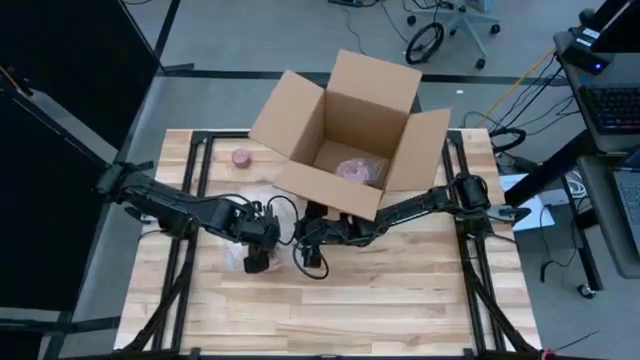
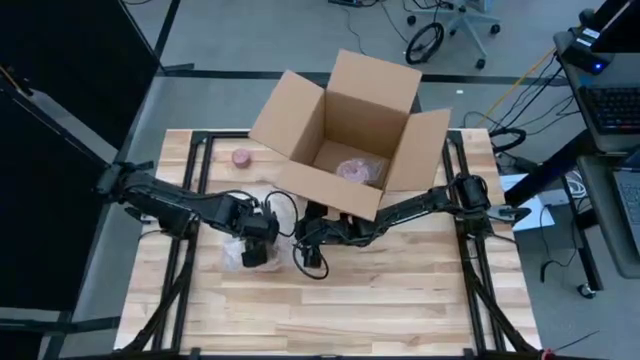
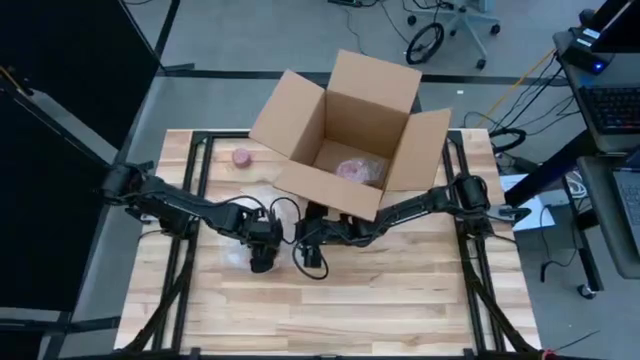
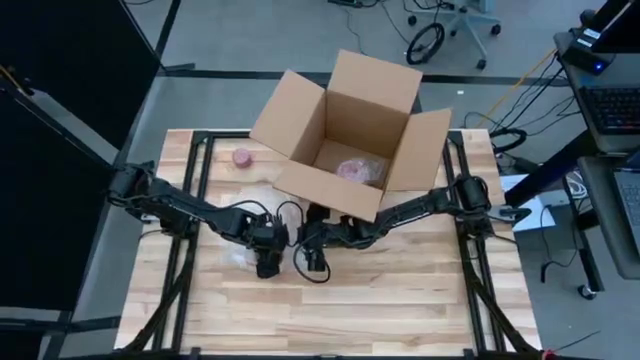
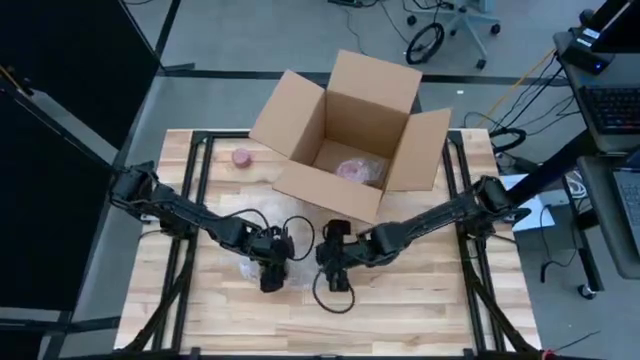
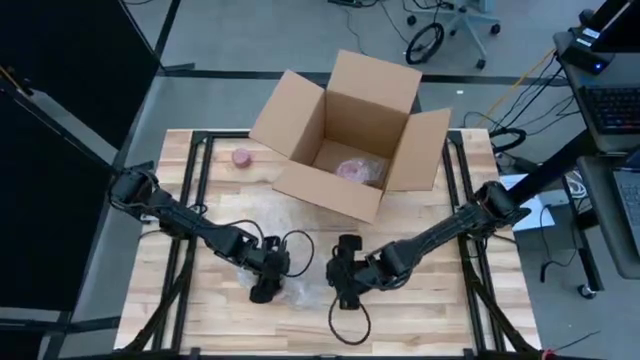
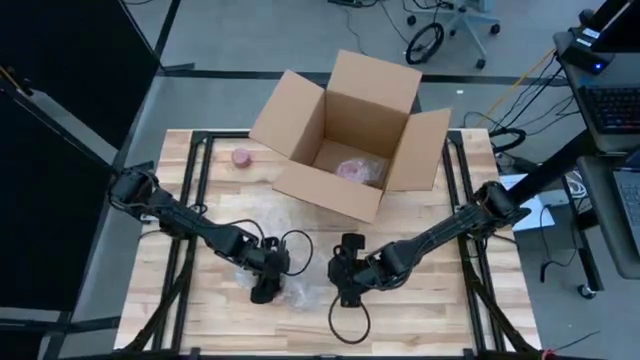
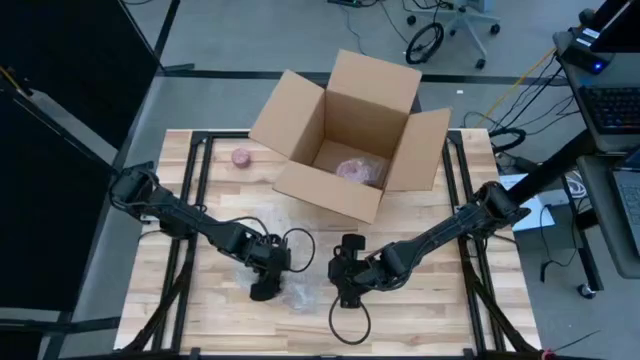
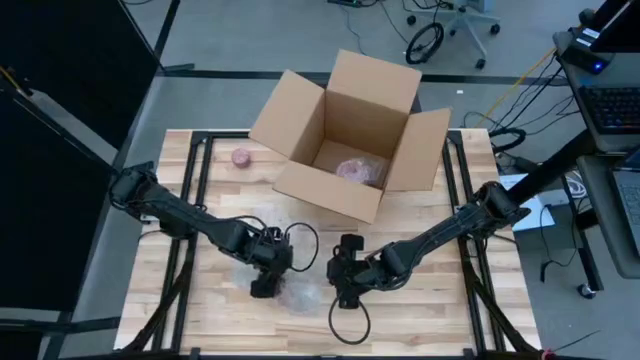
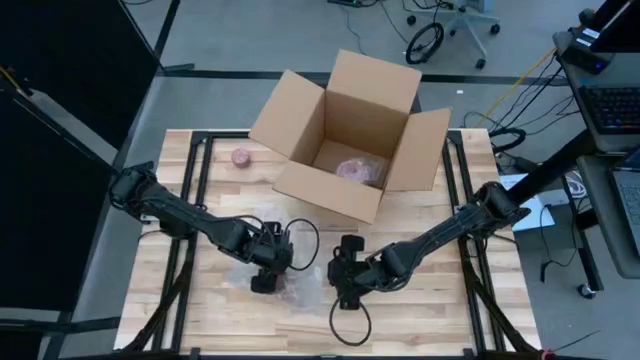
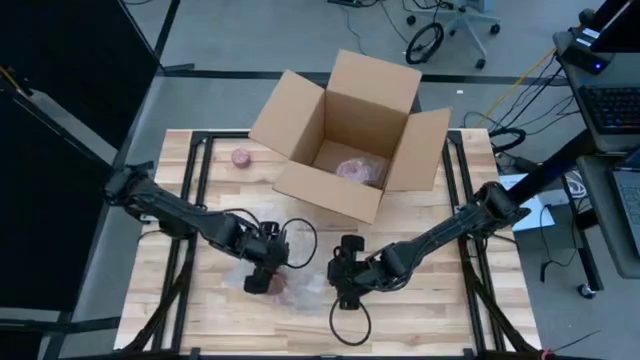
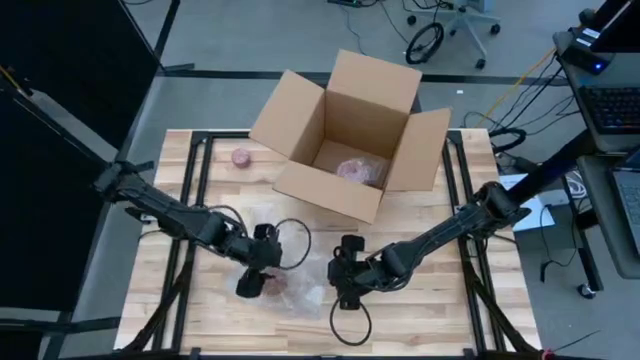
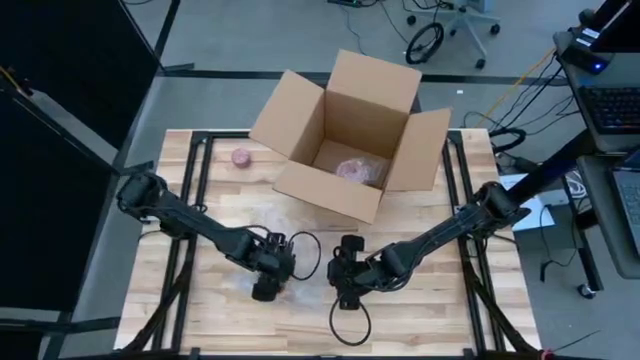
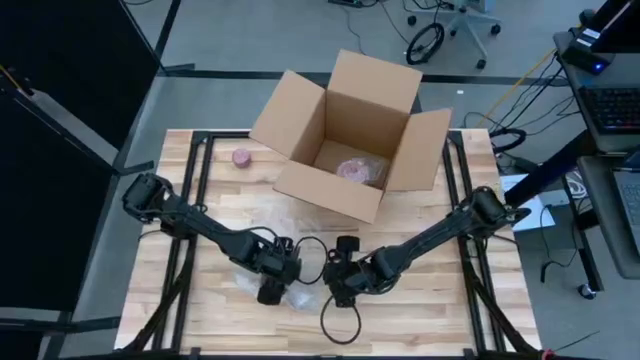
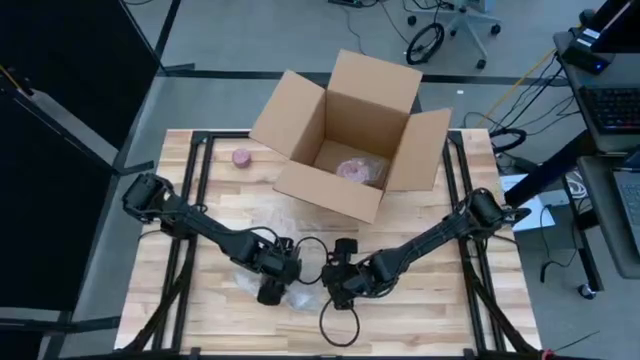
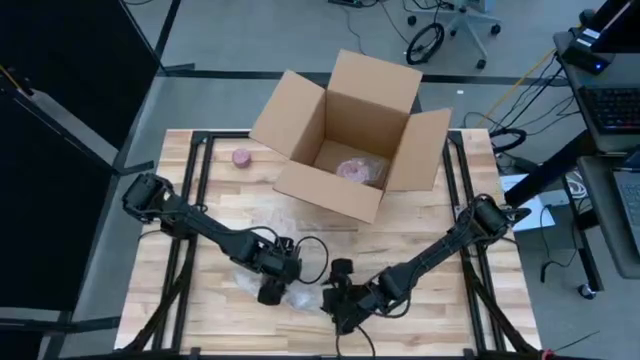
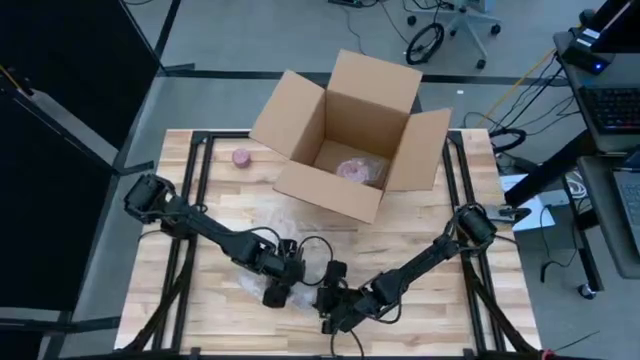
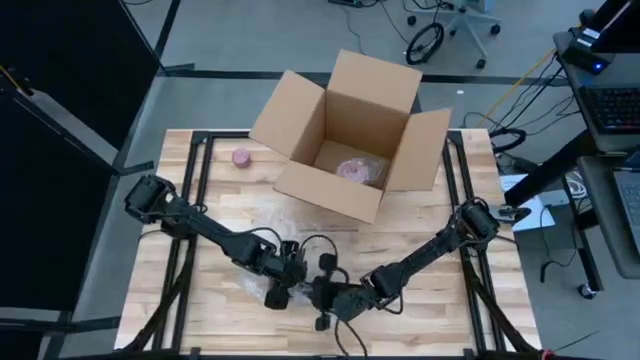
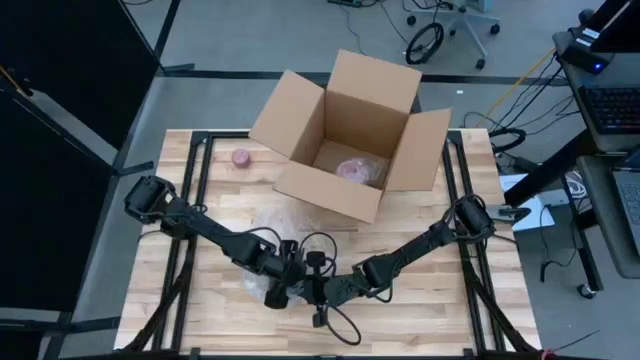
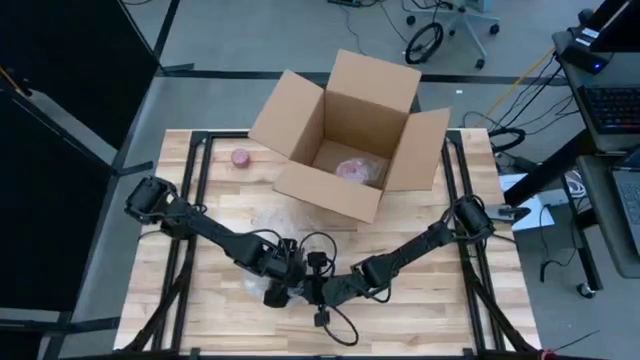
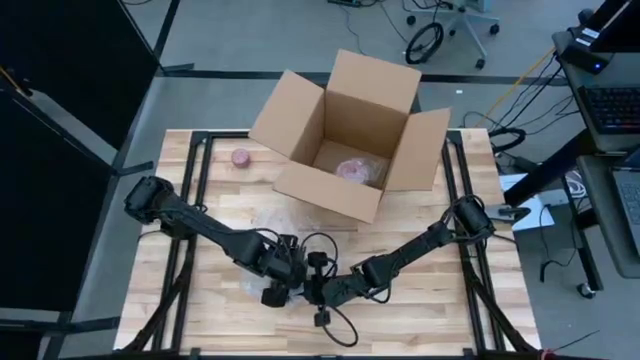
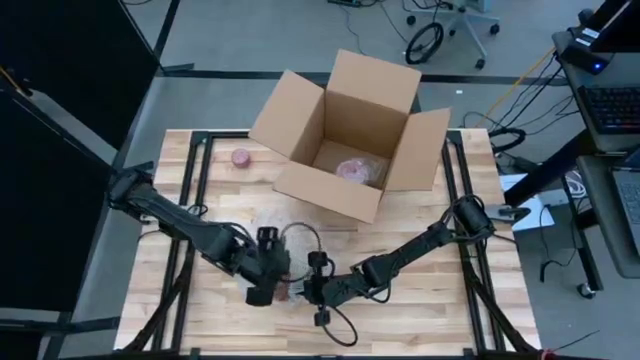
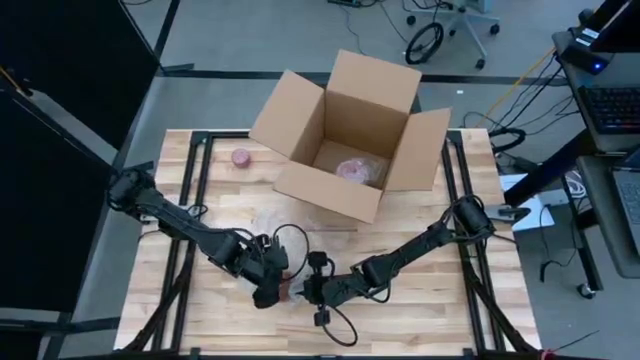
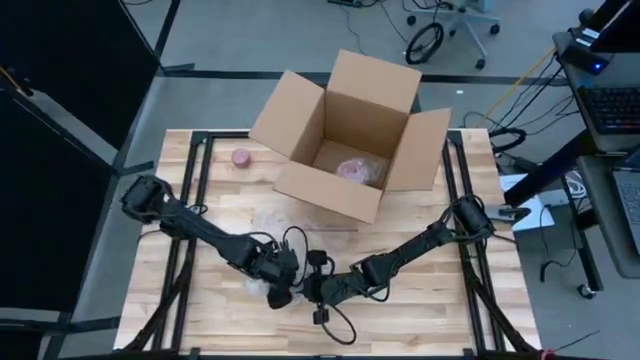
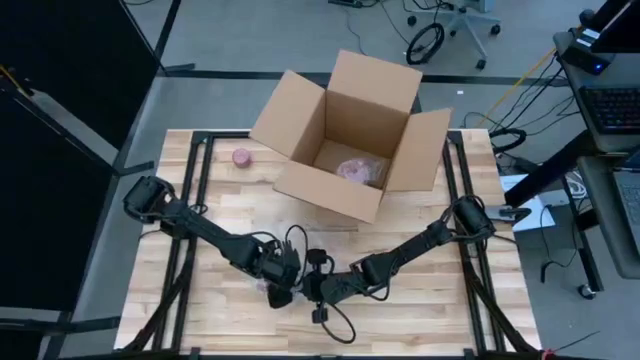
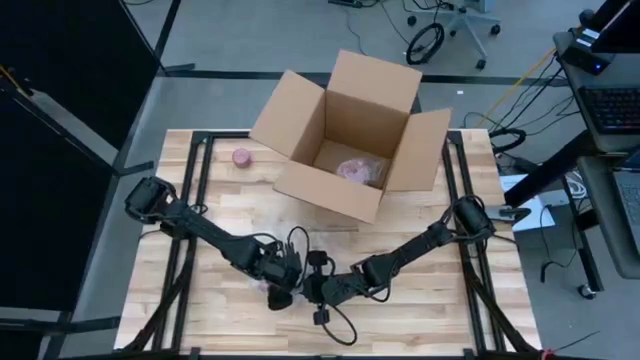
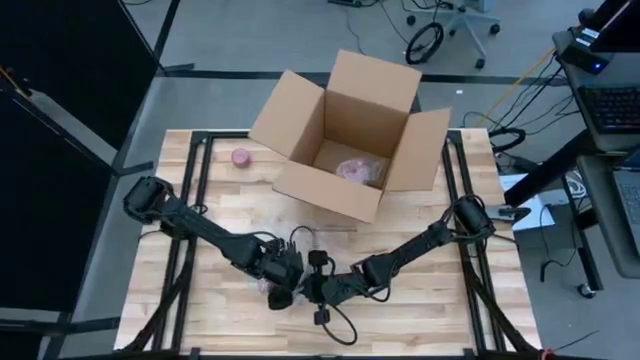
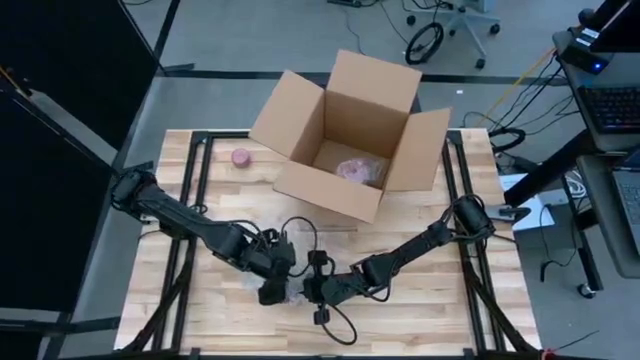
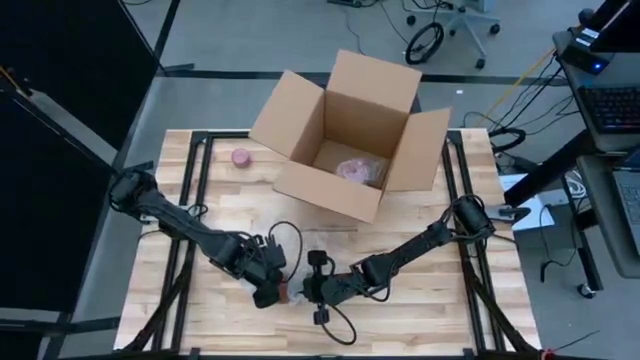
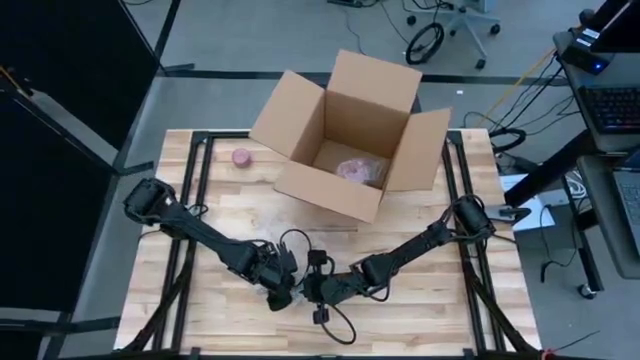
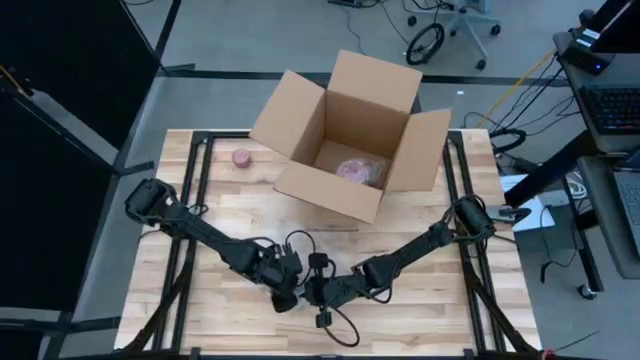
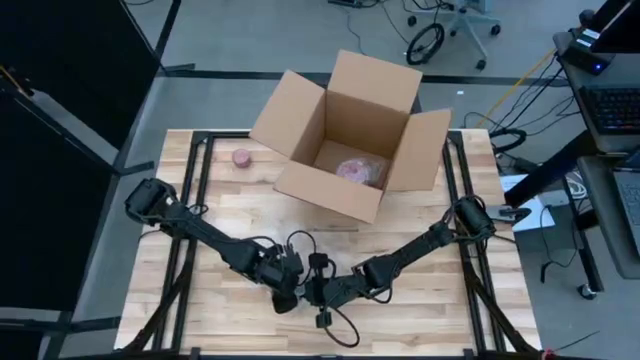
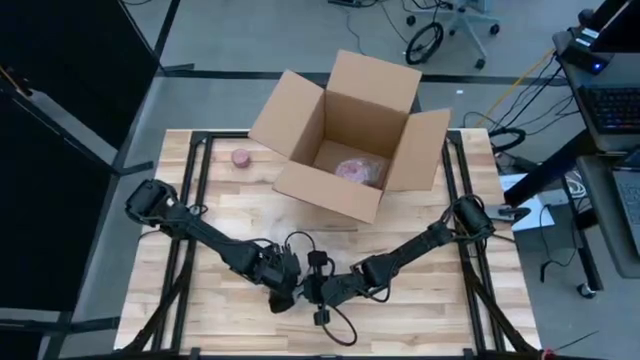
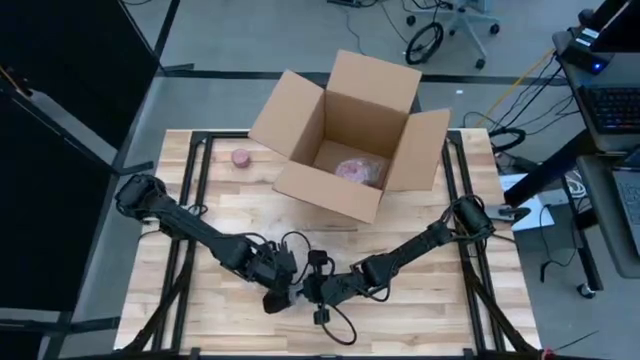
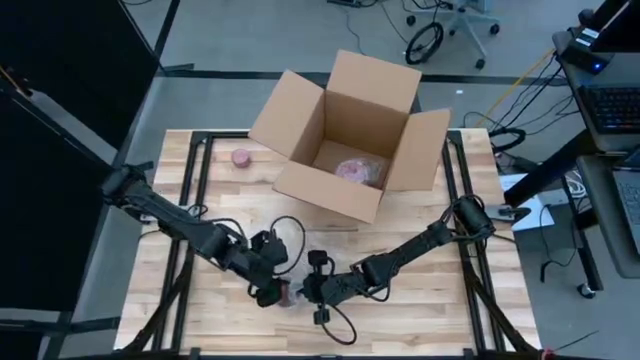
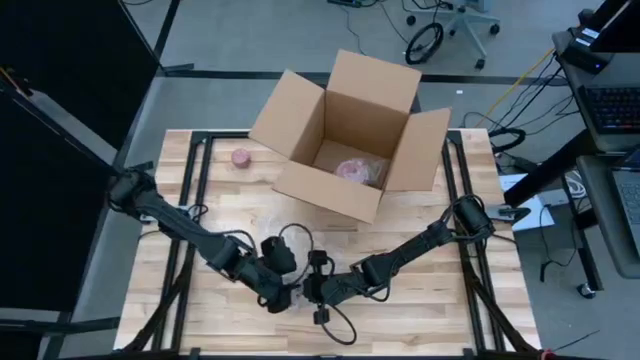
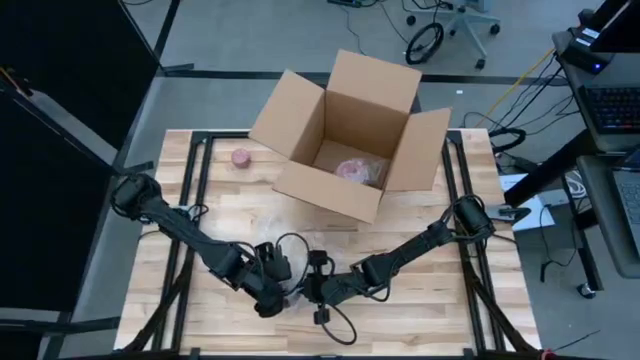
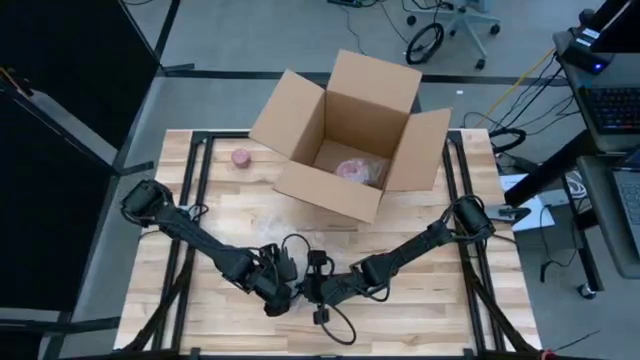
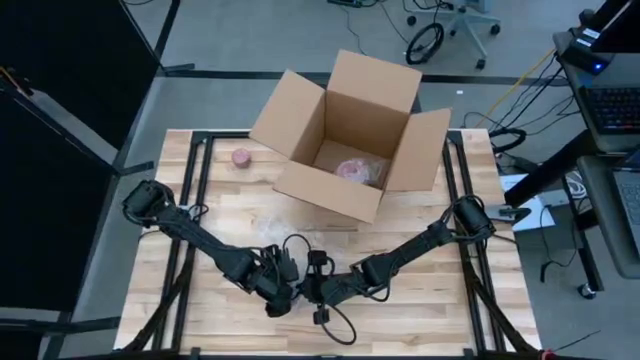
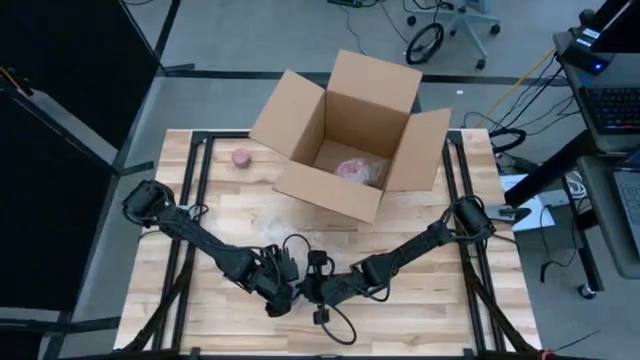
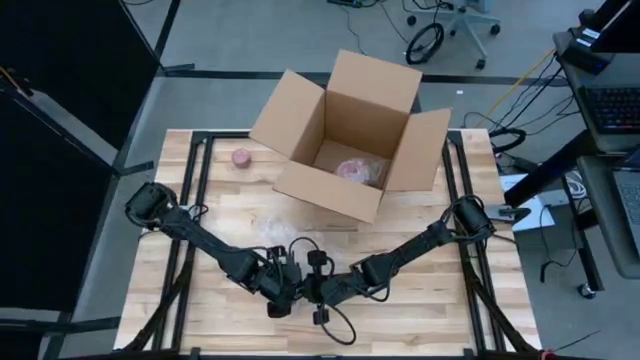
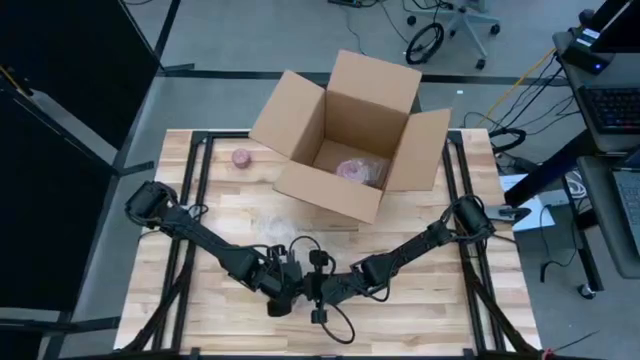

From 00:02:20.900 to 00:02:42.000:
Task: wrap mug
Wrap the yellow mug in the bubble wrap
